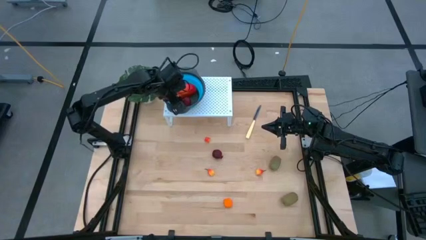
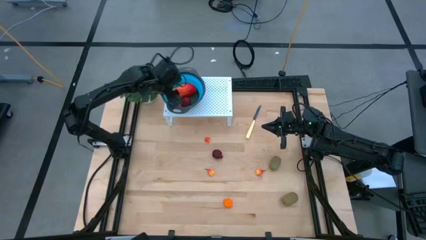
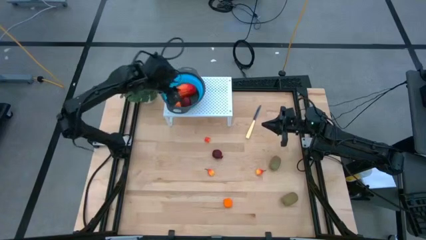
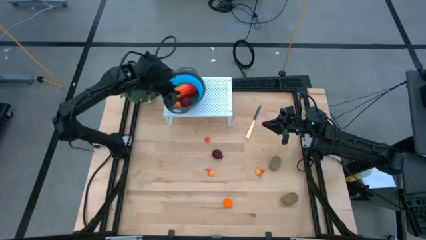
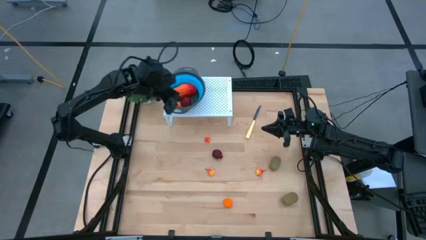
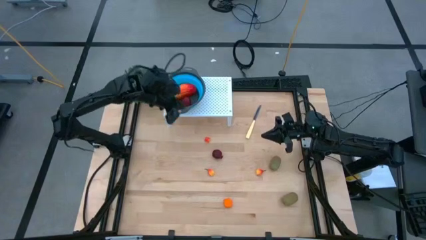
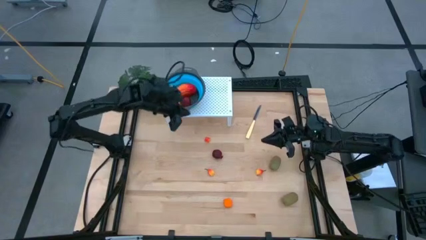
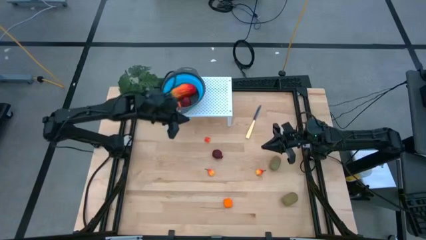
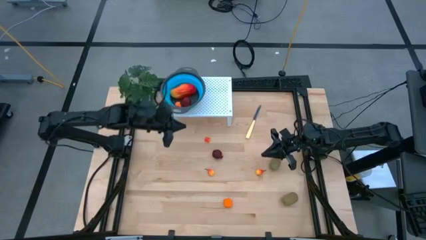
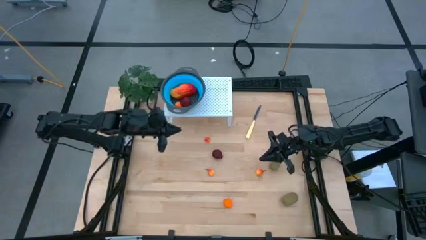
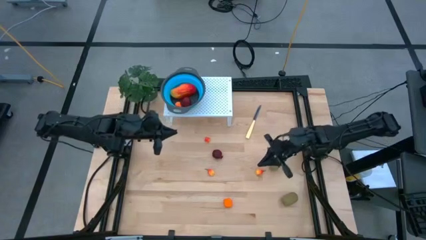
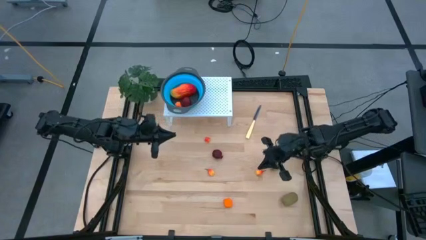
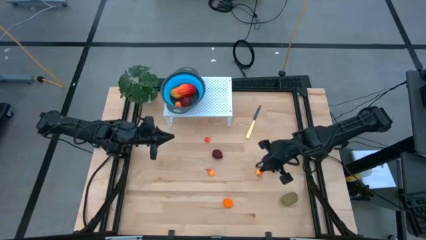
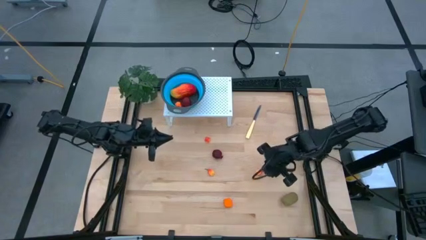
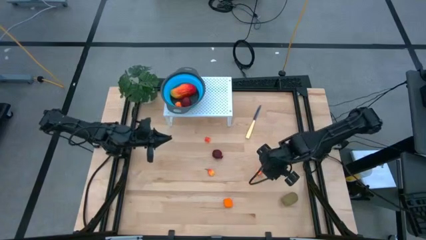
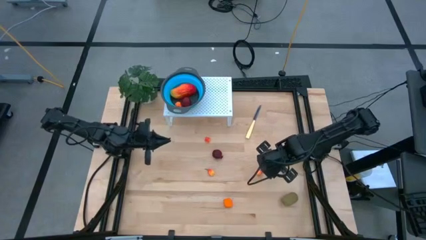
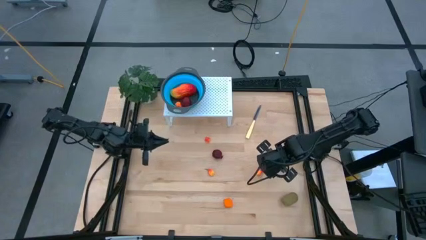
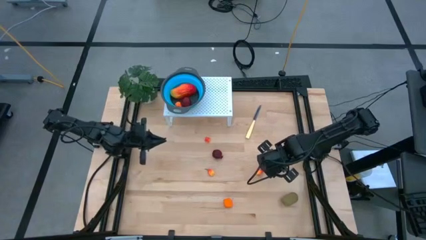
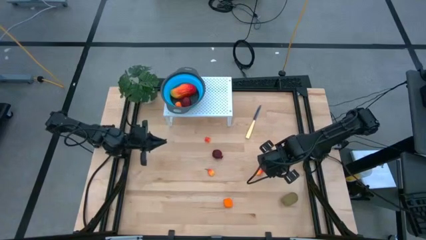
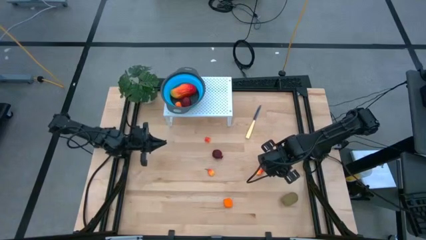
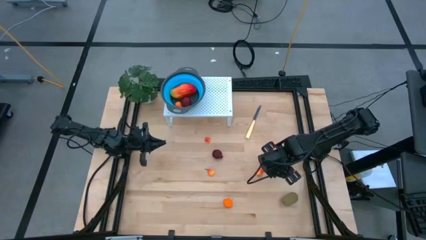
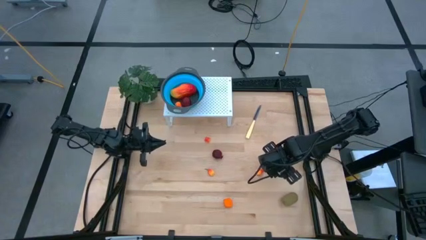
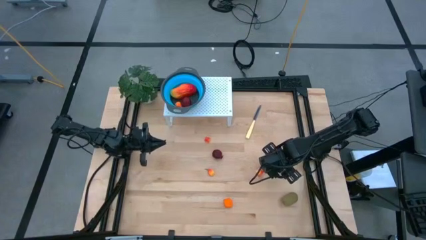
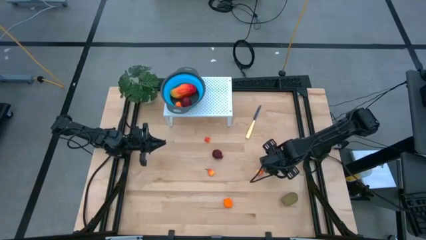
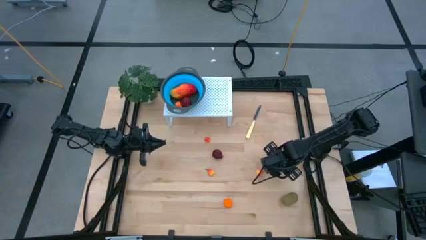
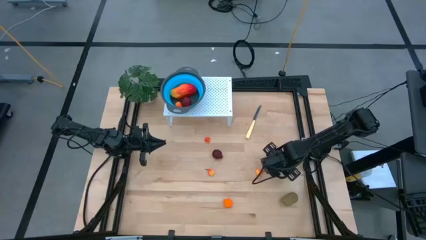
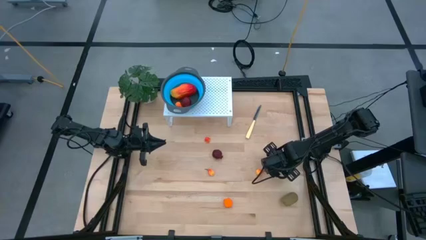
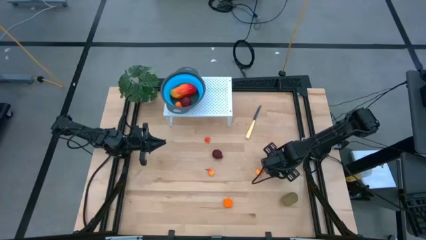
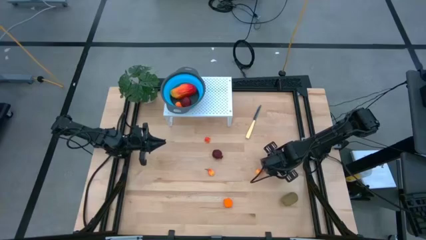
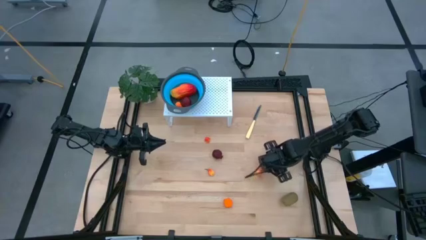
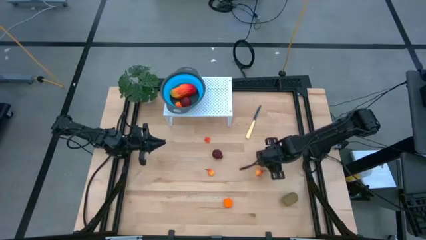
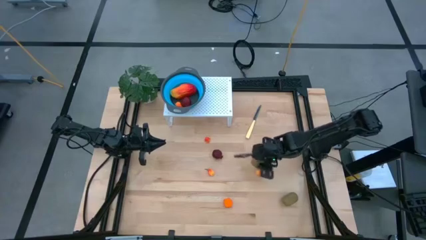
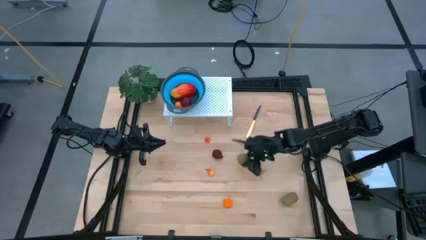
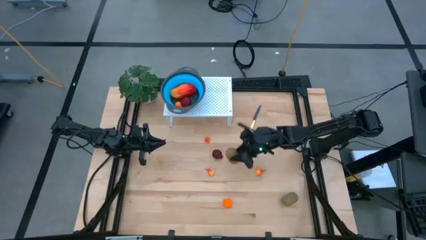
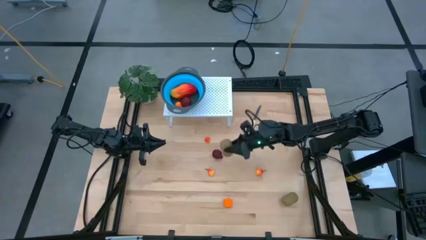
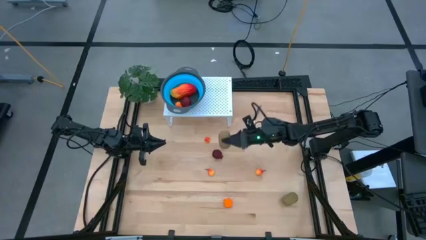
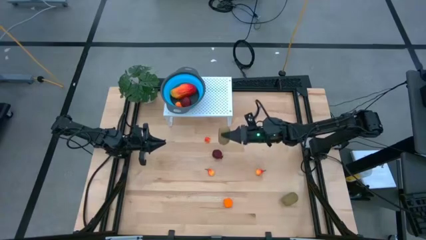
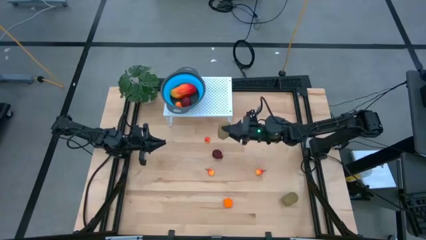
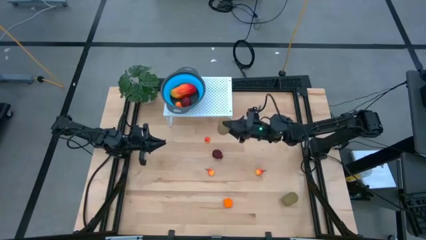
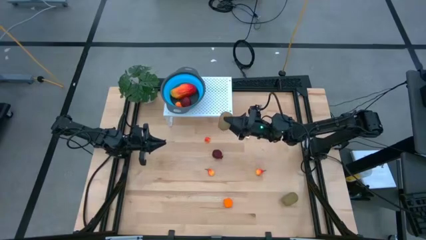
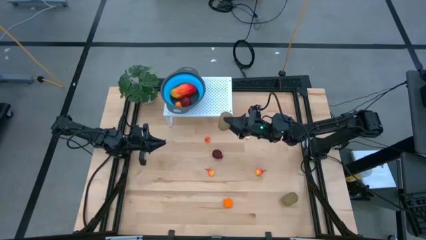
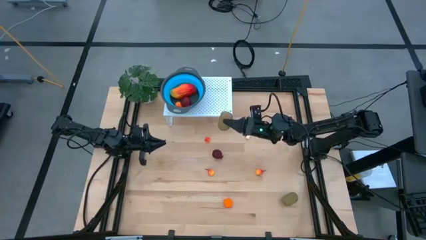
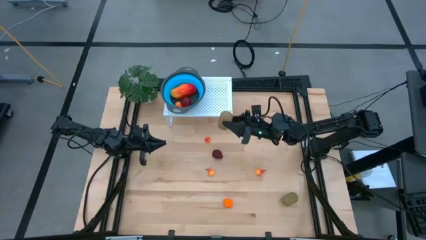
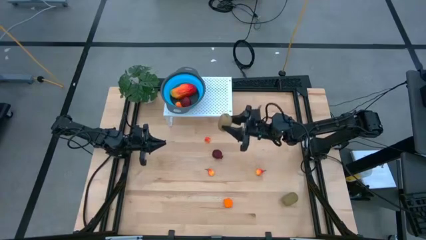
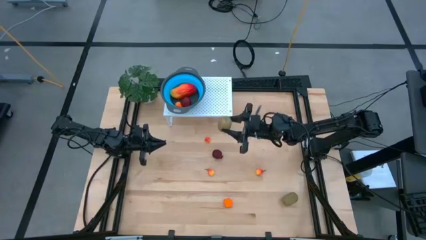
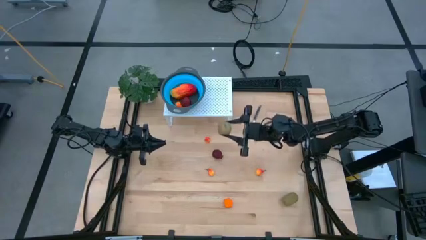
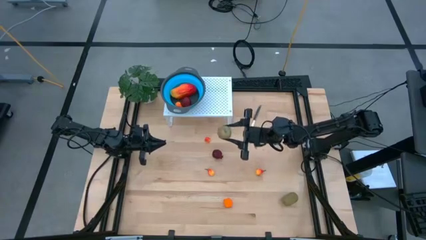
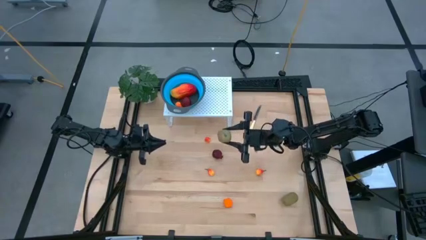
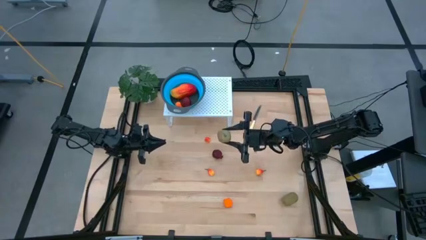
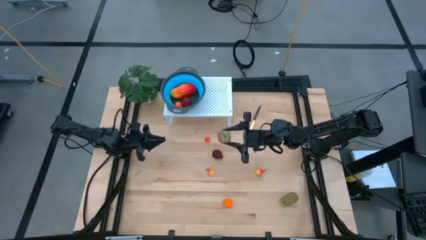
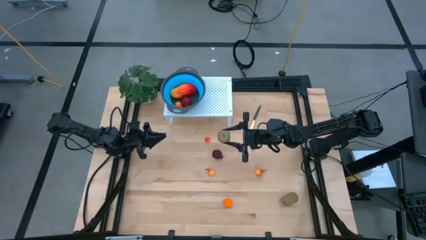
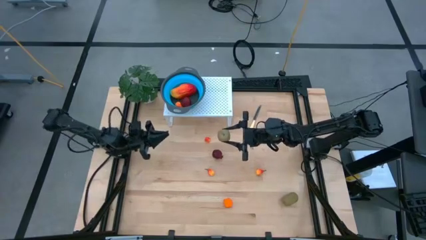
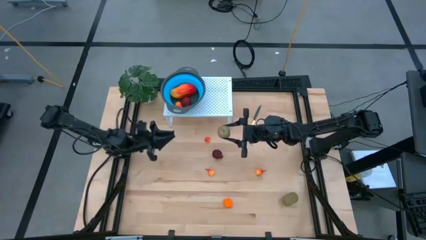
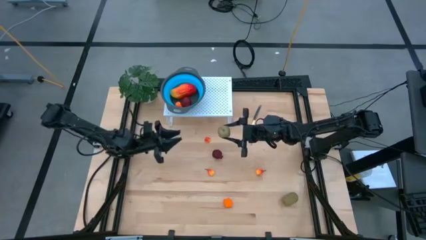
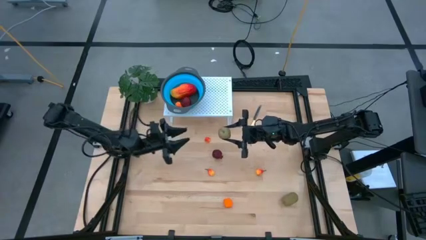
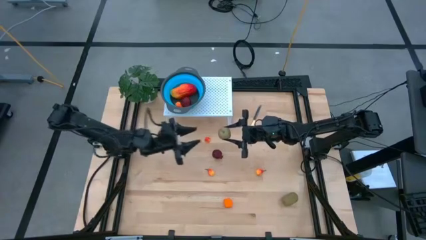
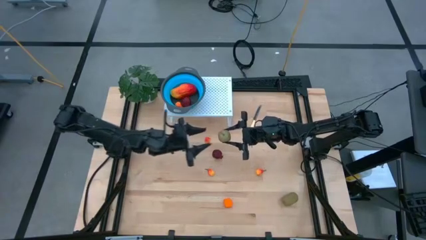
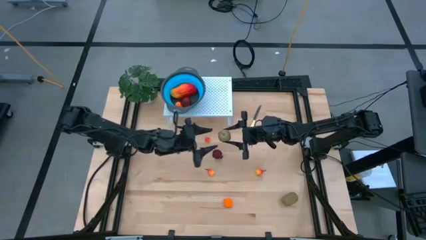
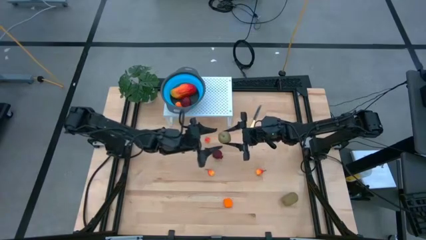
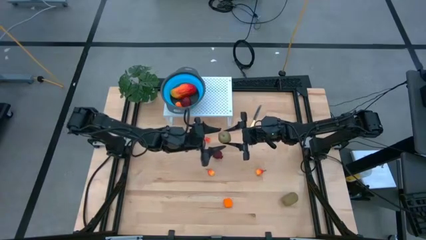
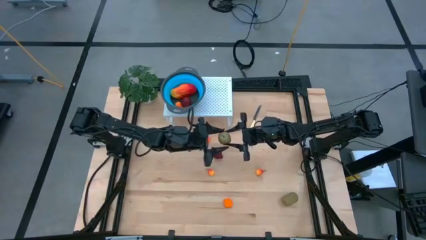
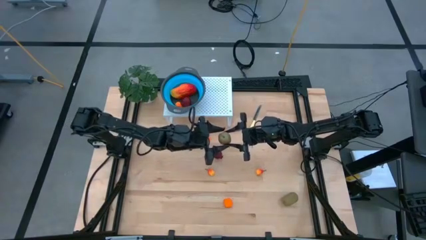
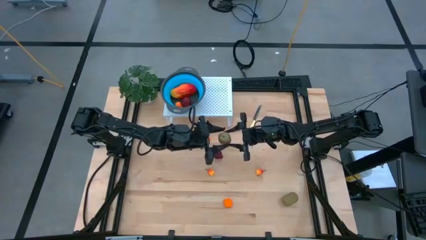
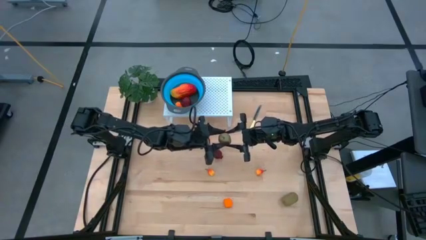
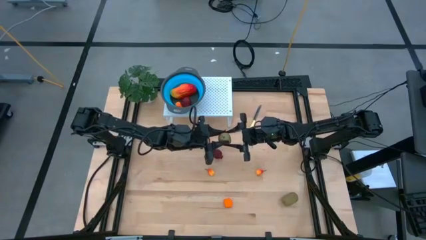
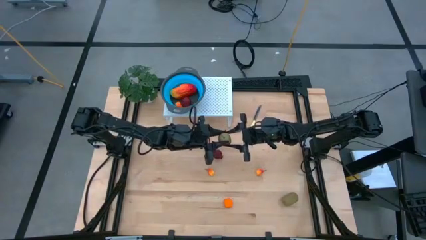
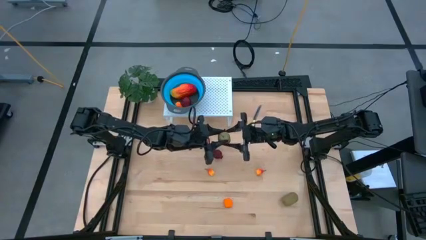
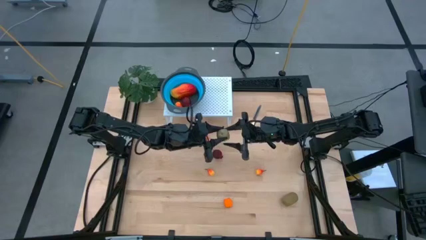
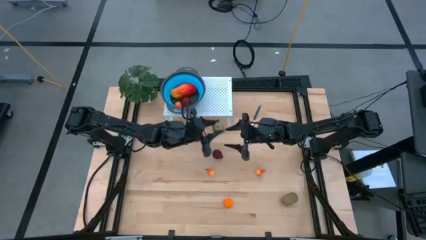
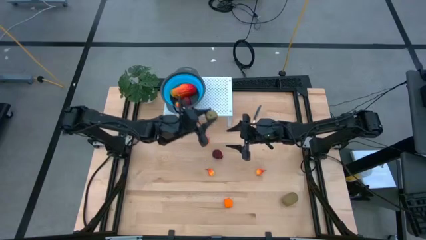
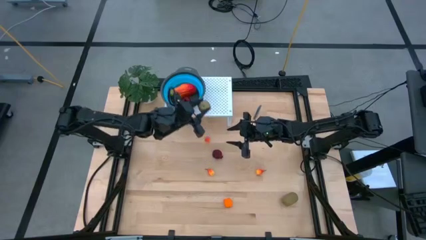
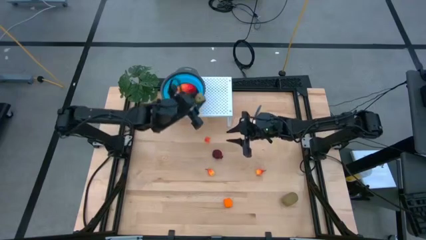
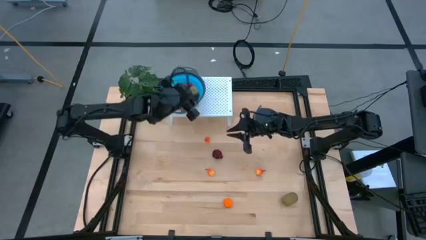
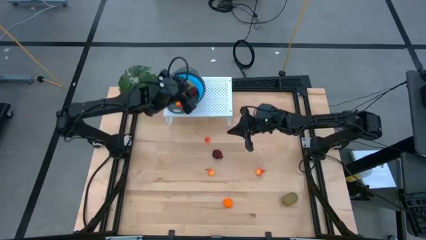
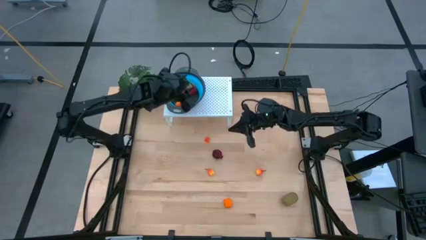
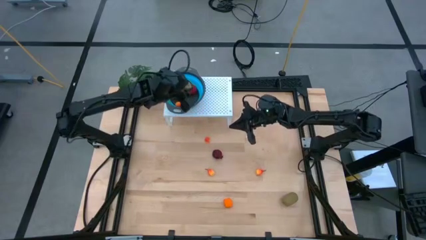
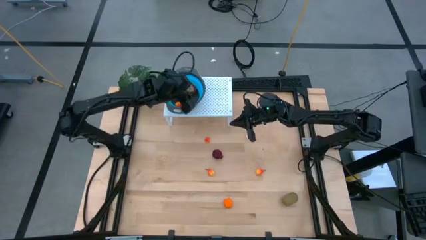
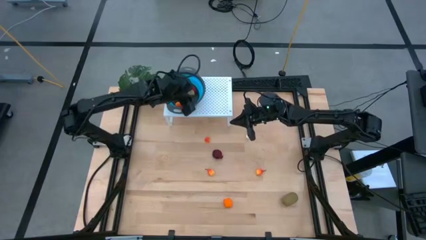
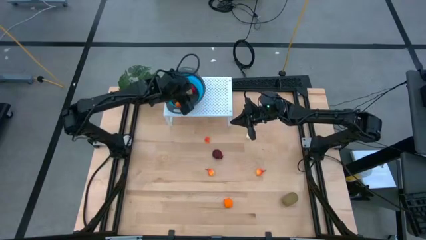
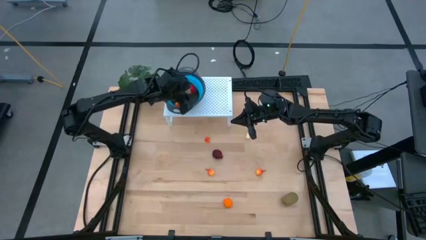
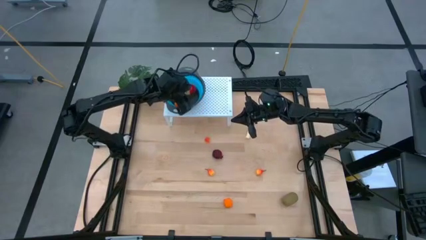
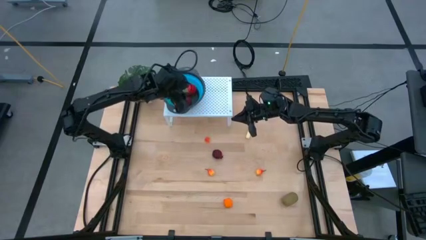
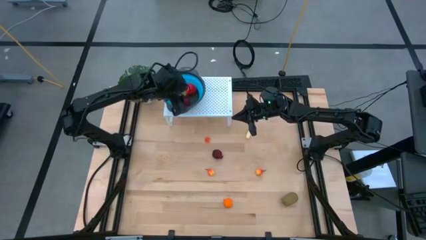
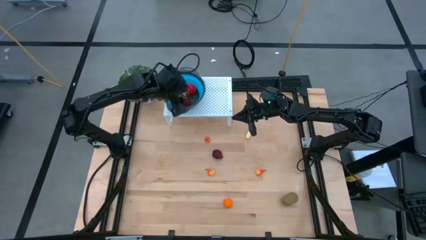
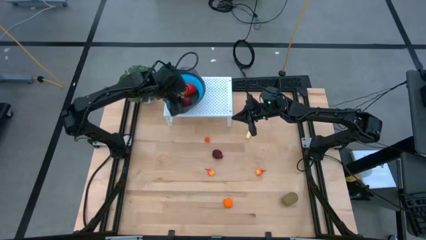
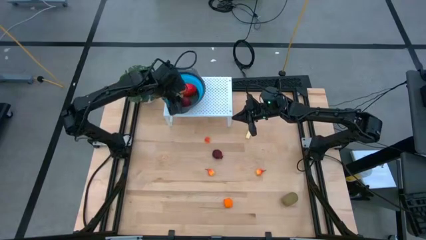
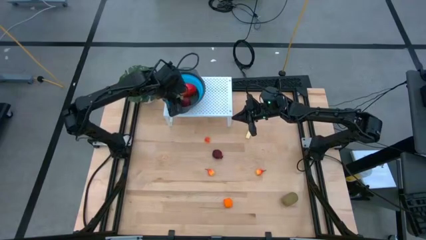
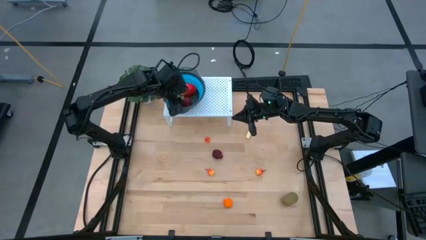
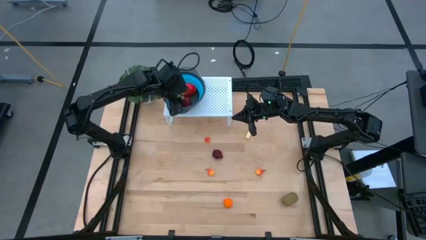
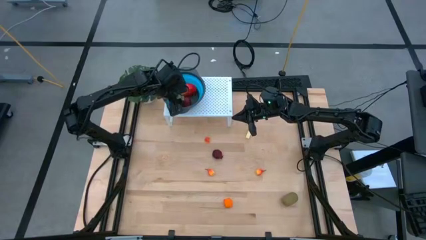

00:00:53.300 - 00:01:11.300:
Task: Pick & Place Fruit
Put the kiwi into the strainer bowl on the shelf
